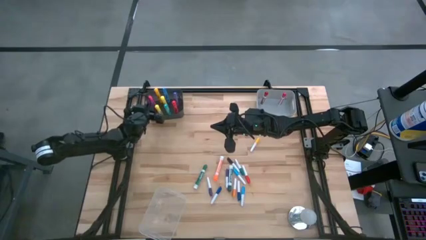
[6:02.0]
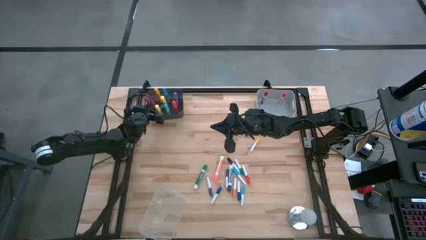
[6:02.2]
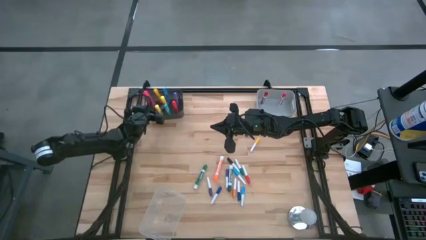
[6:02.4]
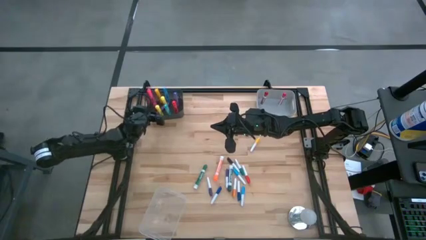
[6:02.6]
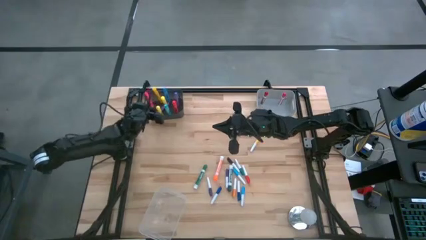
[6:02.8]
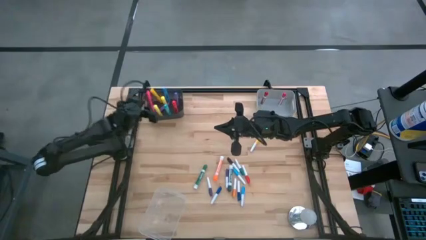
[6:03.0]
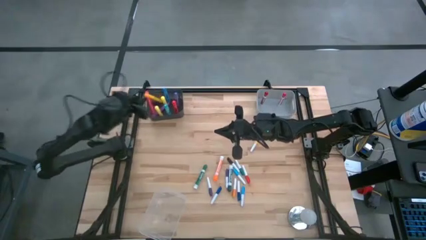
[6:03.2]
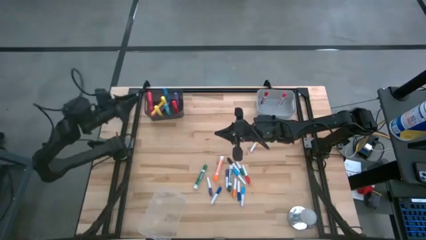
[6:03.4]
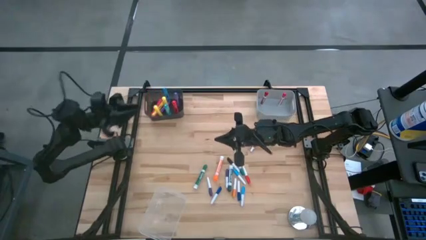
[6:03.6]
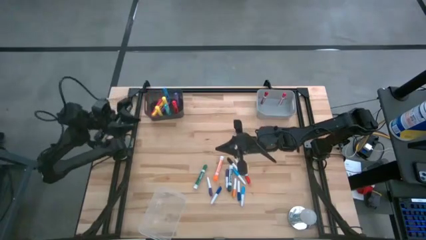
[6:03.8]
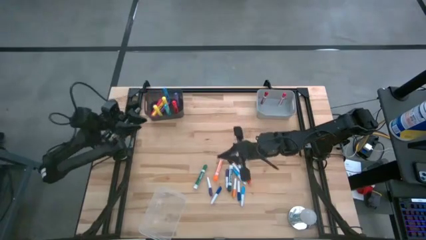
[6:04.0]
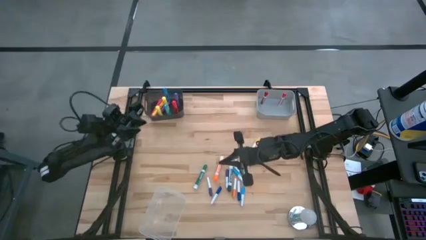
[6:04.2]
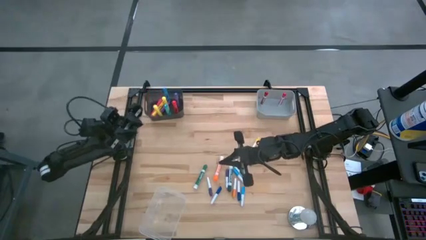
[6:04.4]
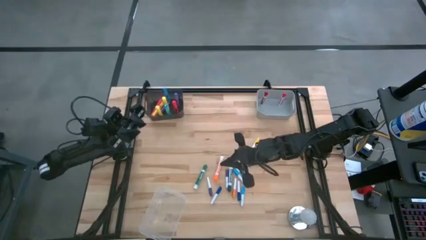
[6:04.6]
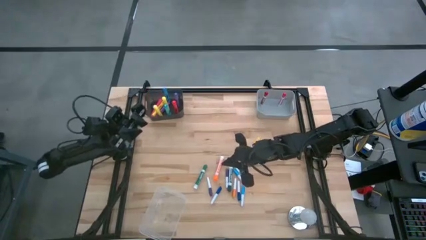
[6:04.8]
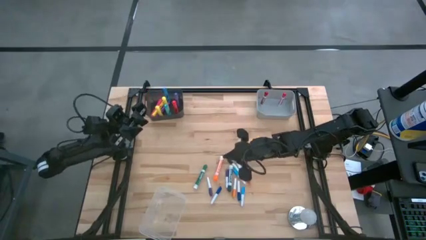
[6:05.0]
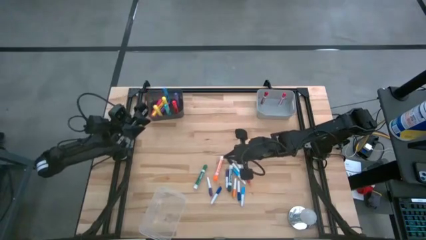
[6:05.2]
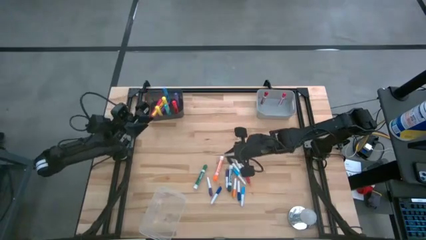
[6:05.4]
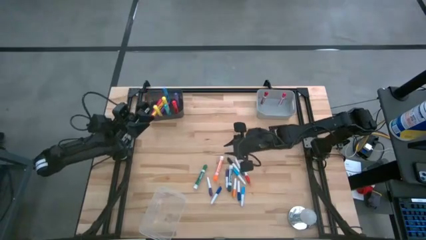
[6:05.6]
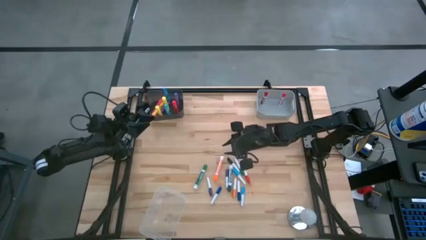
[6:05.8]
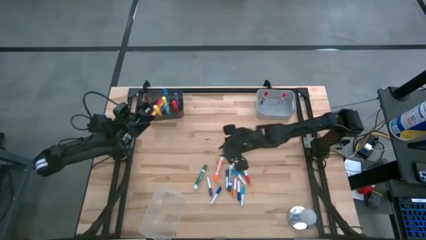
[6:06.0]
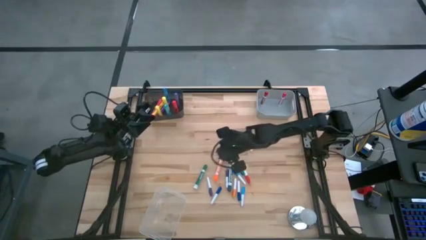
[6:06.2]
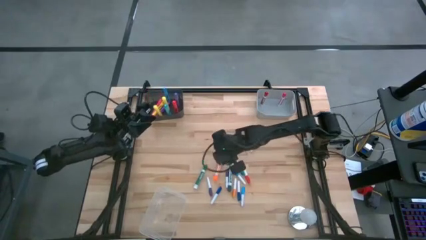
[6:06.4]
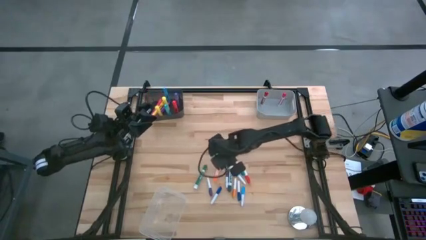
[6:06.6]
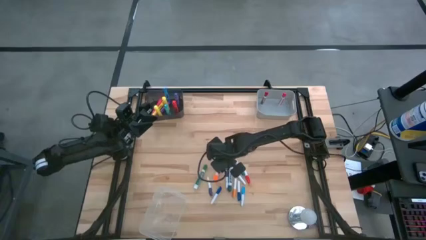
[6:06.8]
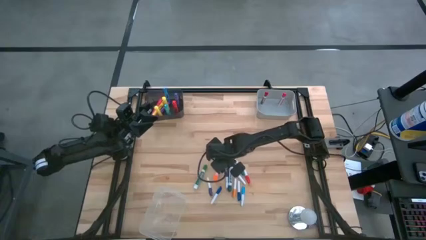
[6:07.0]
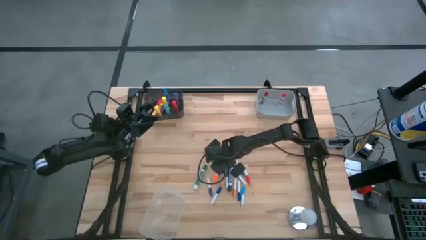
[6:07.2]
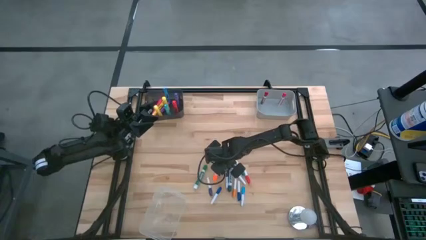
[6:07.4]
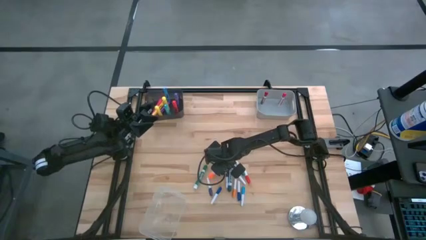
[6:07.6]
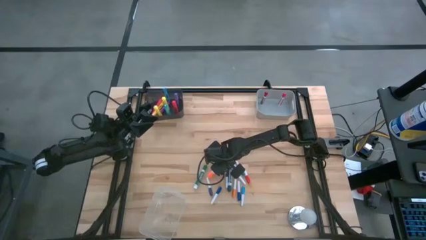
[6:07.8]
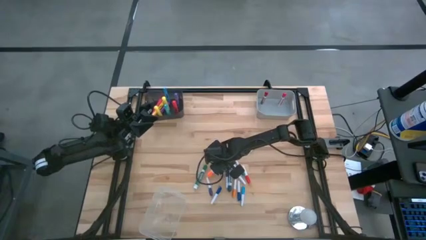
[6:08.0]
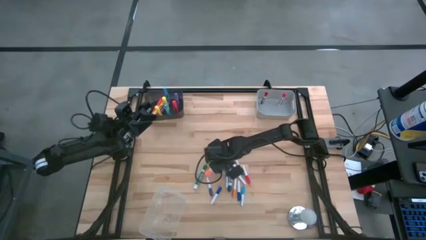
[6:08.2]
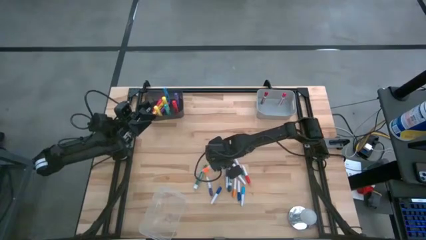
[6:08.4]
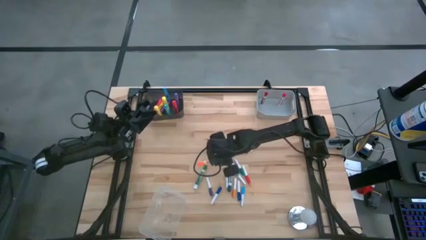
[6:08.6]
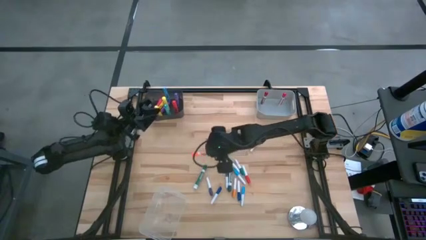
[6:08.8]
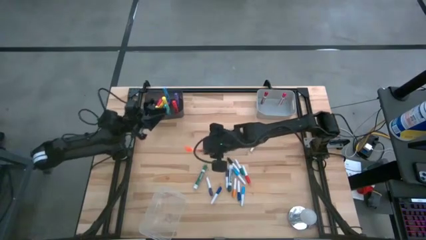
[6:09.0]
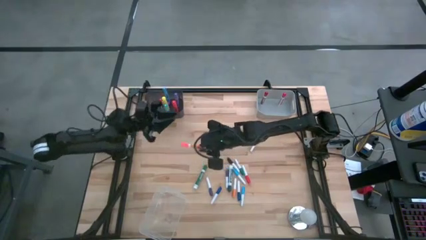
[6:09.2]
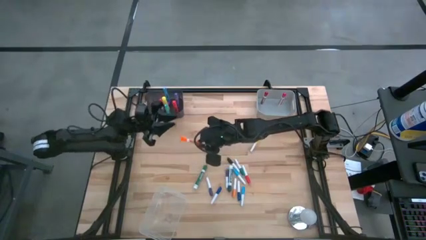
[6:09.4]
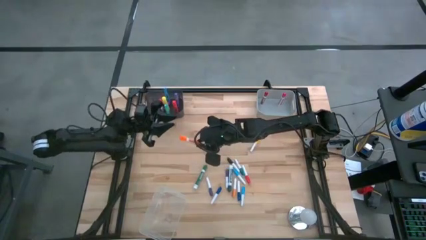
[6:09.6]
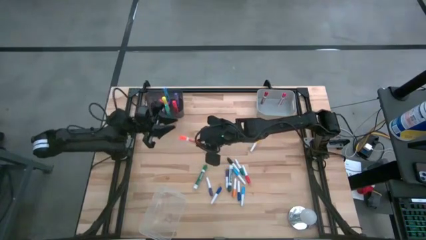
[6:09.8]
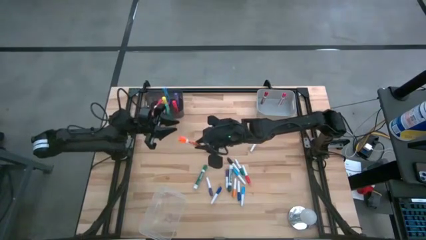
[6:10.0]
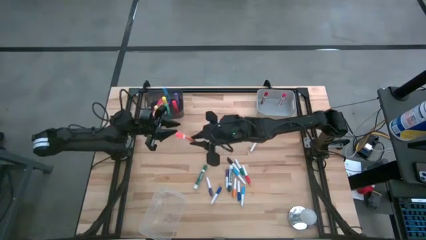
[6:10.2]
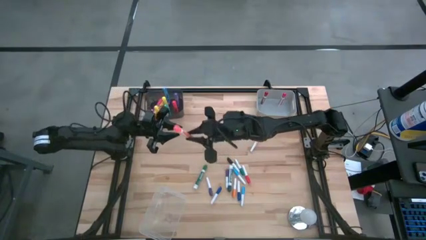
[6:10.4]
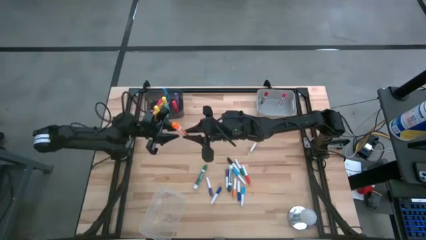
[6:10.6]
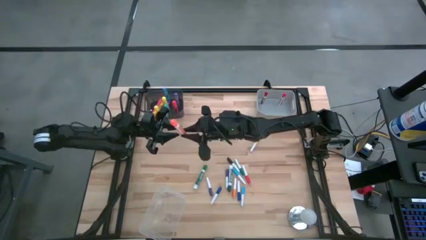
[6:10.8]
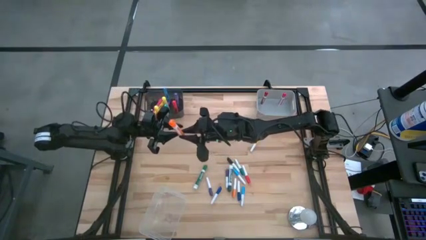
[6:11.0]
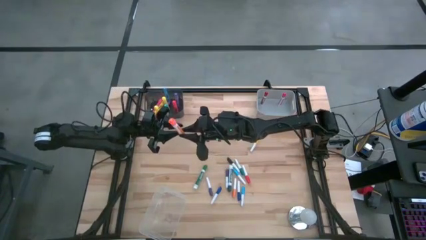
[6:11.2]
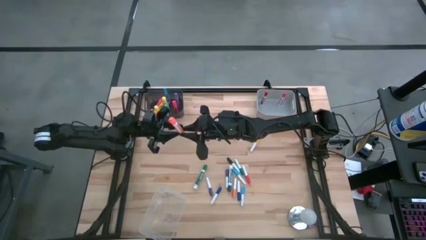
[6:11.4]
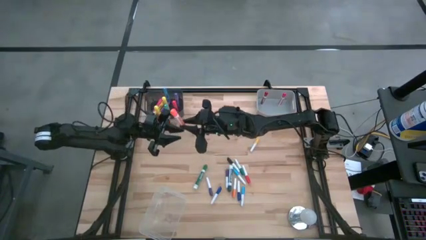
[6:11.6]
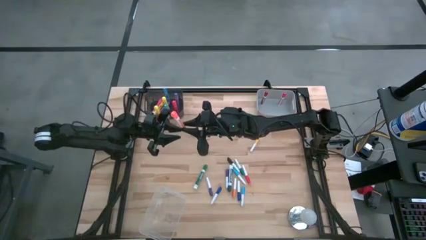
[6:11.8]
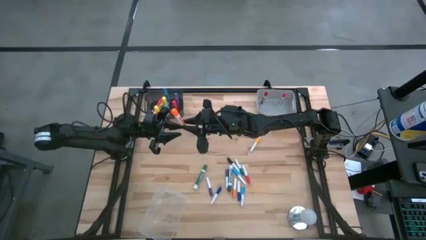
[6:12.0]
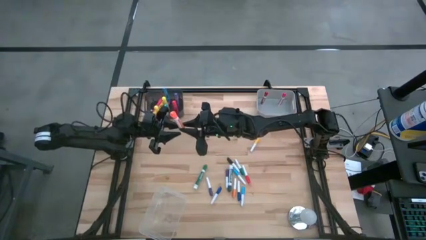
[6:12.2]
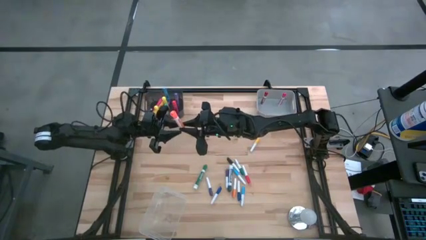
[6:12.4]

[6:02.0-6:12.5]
Task: Pick & Place Markers
Put the orange marker pen into the gray bin

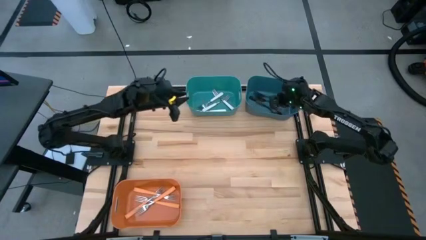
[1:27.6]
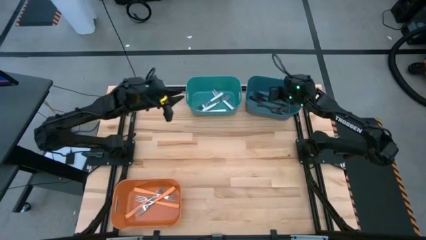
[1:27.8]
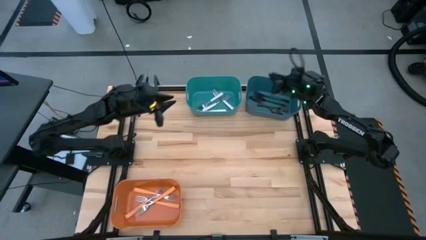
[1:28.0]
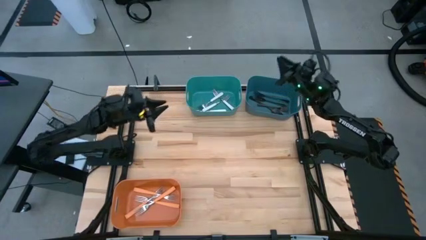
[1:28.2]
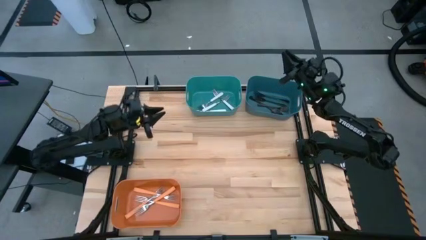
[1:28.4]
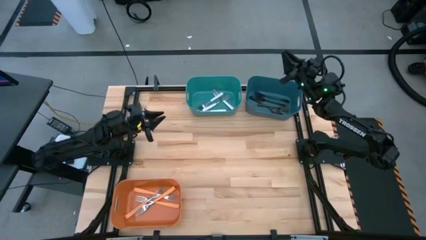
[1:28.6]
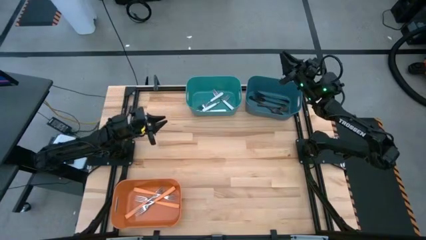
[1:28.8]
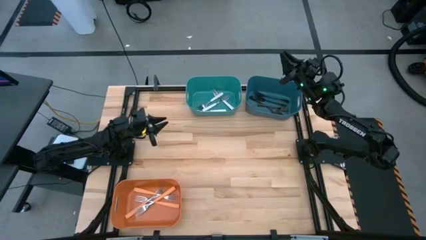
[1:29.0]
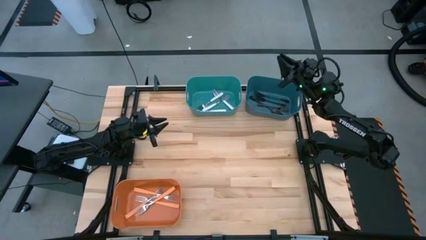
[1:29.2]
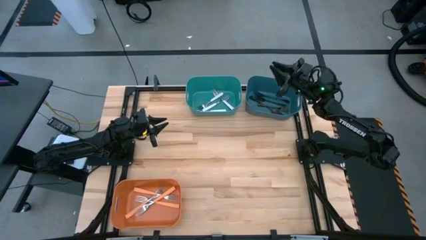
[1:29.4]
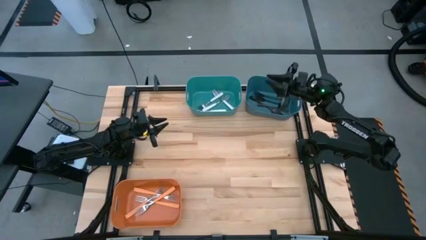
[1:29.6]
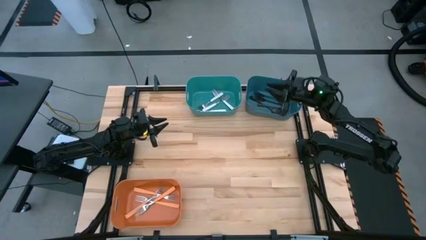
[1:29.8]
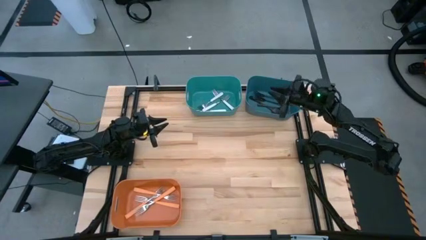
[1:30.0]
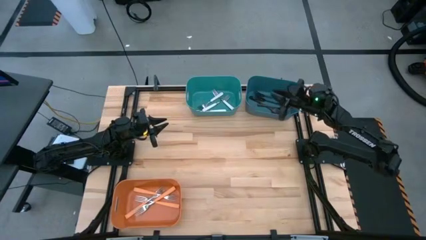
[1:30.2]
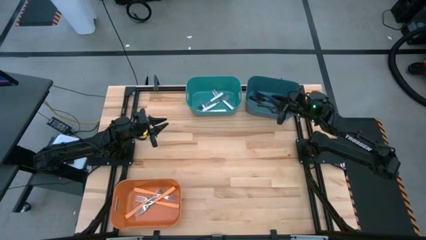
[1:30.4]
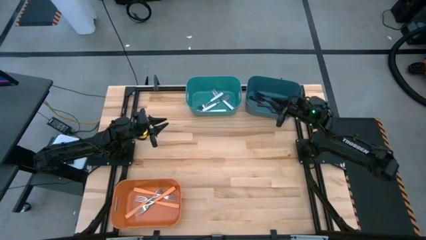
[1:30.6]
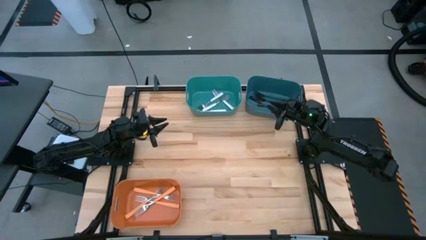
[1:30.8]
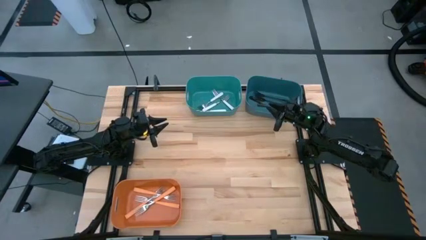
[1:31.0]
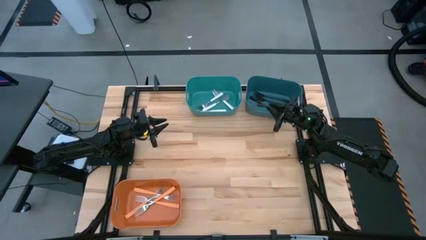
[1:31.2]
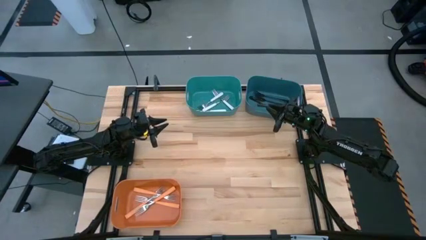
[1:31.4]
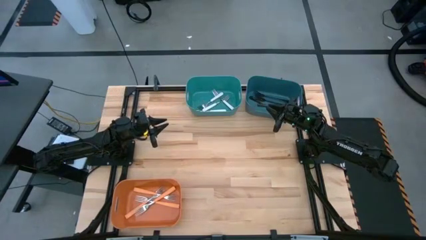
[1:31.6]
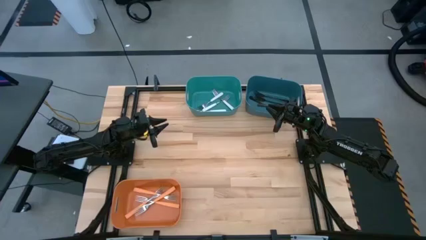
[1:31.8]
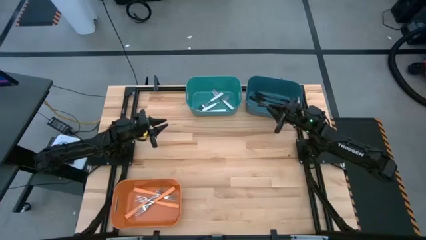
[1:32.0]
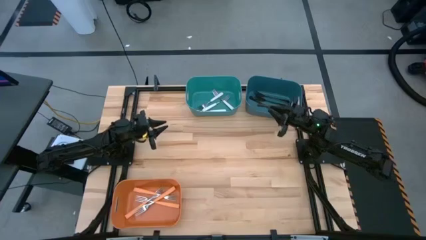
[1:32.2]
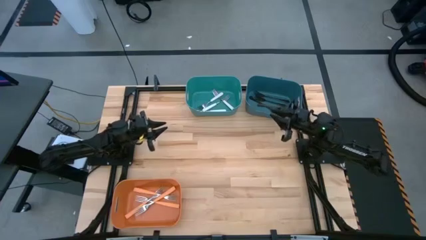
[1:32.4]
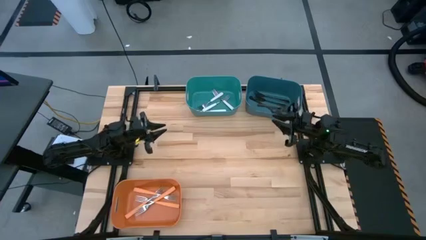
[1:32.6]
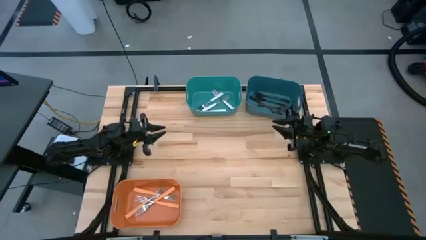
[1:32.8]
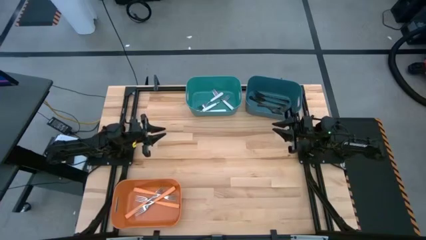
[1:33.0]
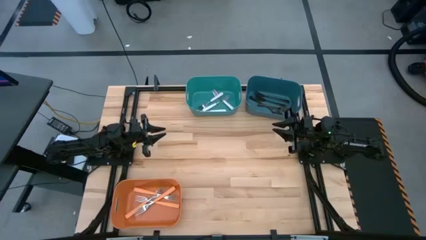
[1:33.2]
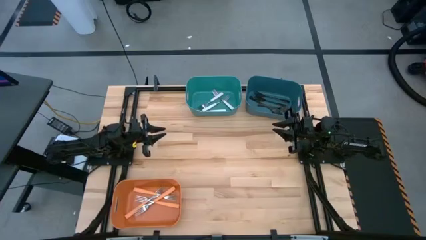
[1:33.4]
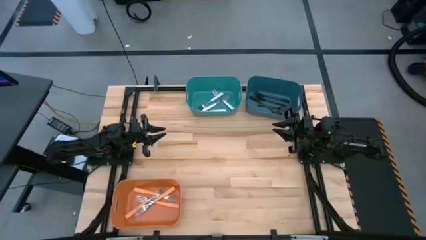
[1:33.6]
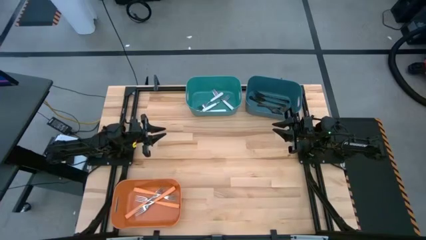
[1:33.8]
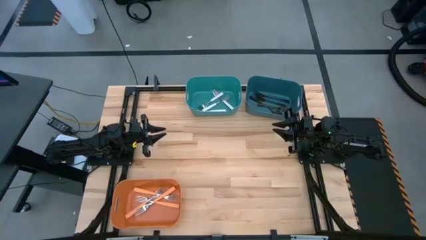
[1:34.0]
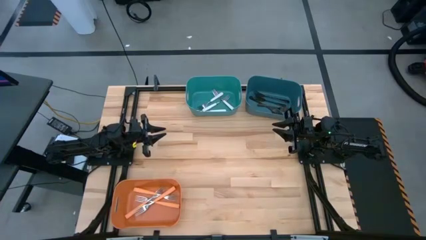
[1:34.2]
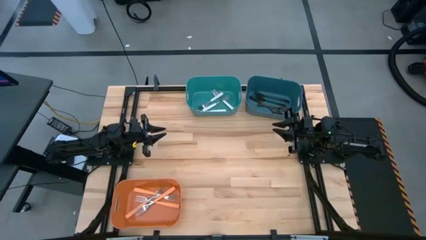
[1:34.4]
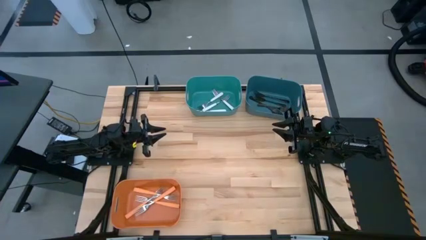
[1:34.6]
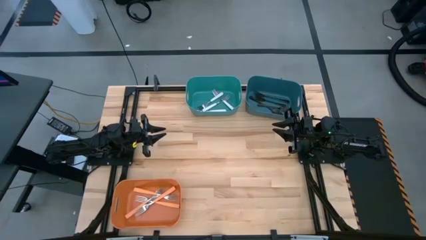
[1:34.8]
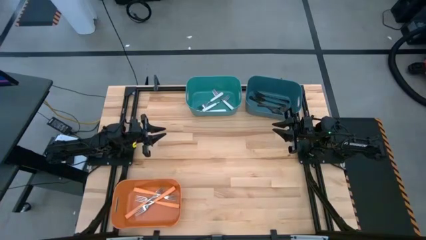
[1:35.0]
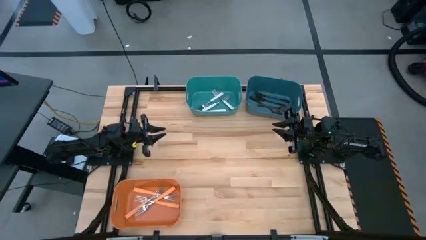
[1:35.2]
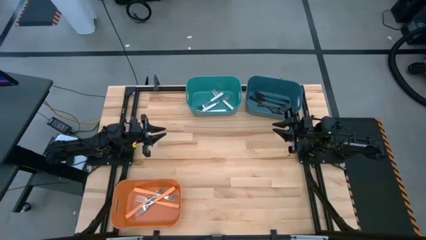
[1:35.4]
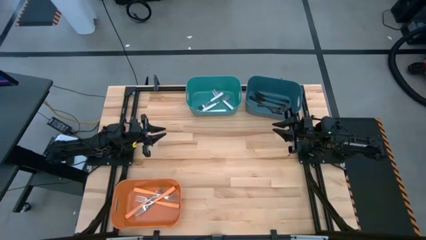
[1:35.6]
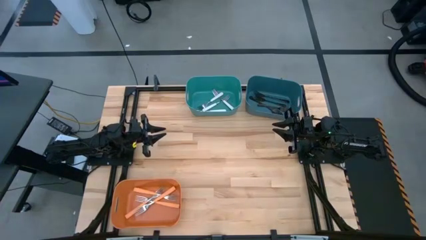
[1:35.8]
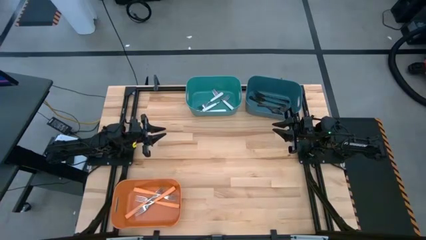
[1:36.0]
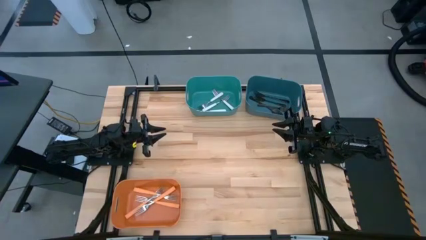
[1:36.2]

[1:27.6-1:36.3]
Task: Sort silverware by color (type)
Return To Home Position
